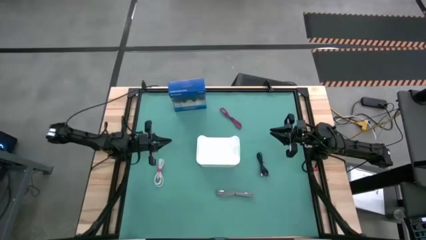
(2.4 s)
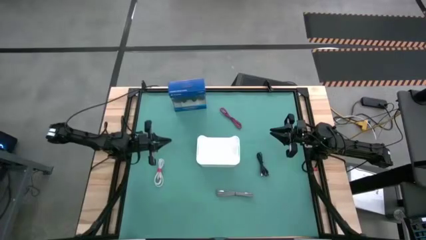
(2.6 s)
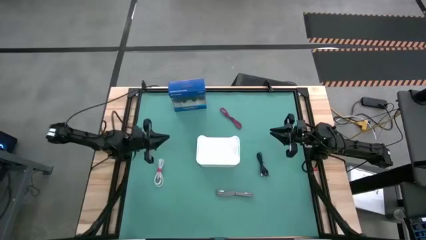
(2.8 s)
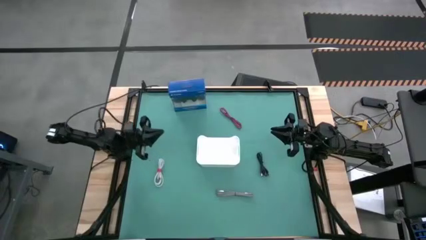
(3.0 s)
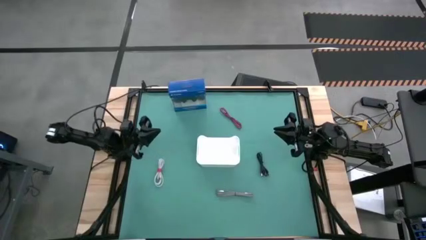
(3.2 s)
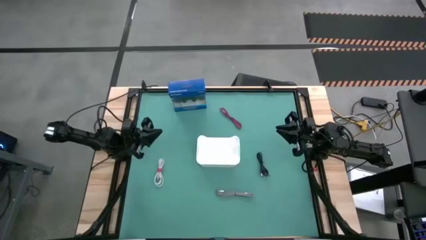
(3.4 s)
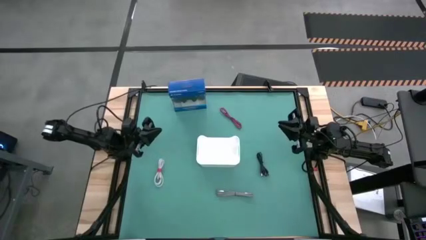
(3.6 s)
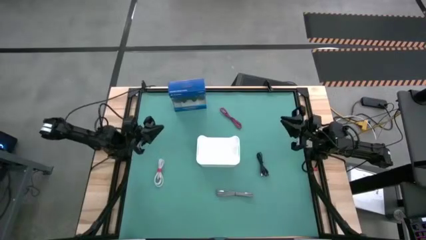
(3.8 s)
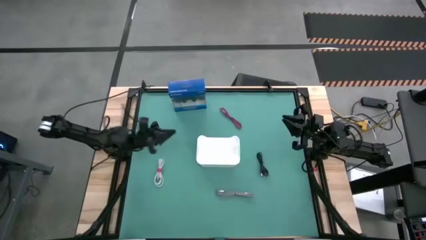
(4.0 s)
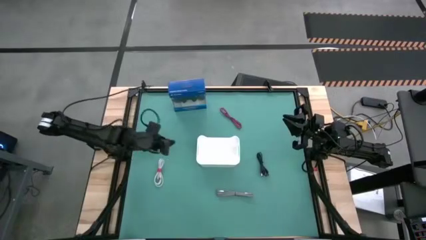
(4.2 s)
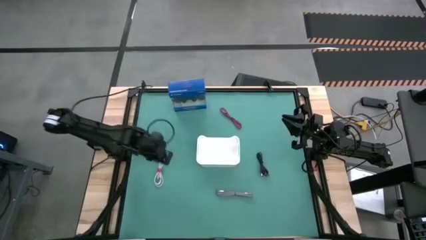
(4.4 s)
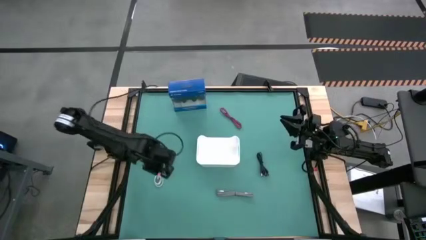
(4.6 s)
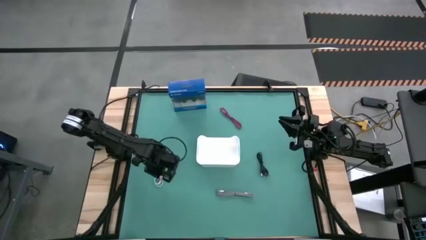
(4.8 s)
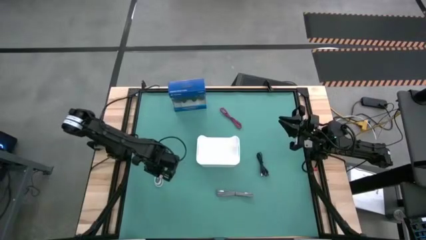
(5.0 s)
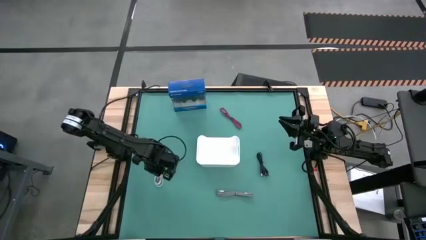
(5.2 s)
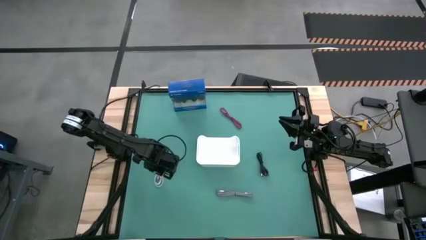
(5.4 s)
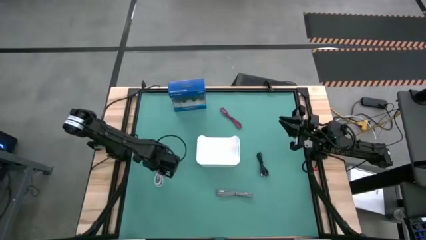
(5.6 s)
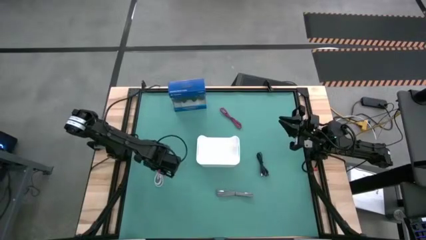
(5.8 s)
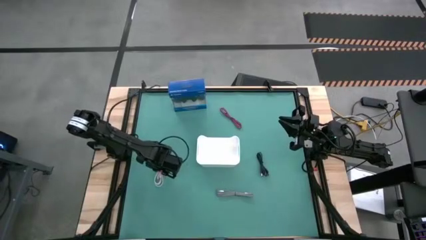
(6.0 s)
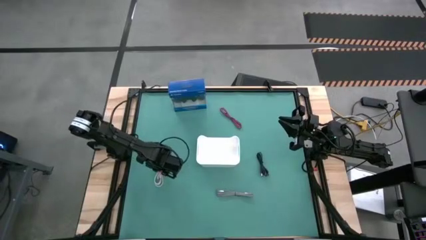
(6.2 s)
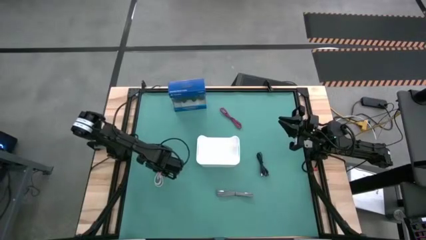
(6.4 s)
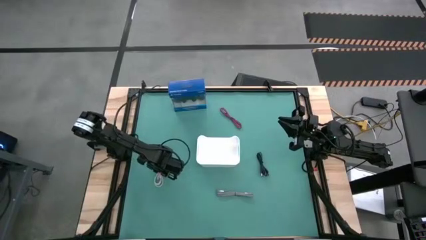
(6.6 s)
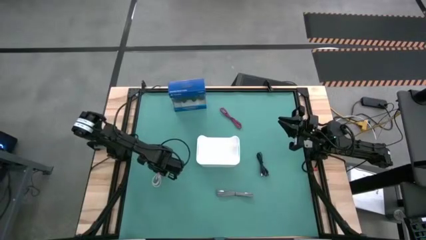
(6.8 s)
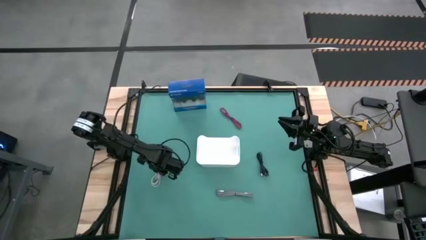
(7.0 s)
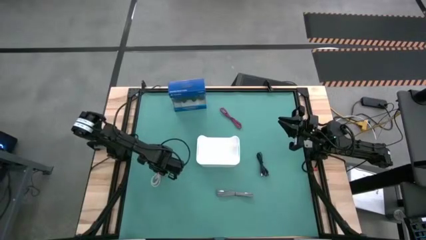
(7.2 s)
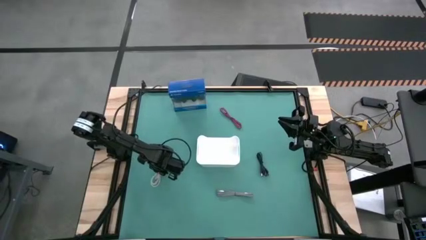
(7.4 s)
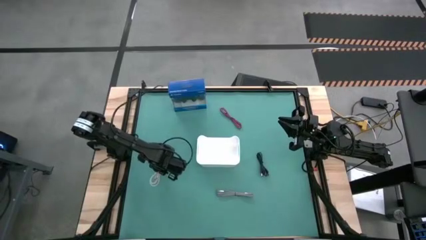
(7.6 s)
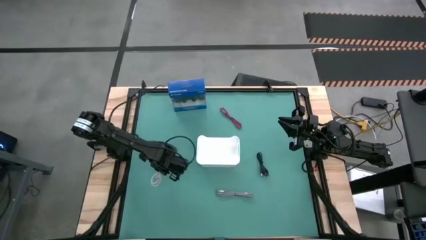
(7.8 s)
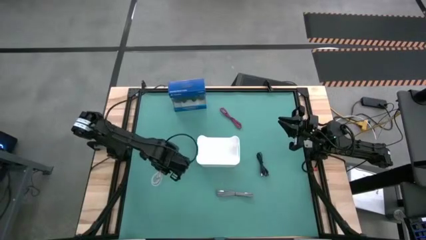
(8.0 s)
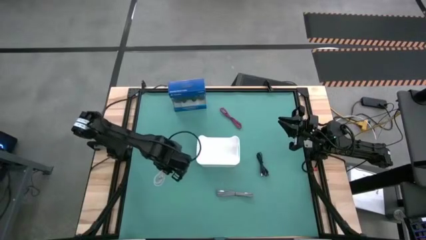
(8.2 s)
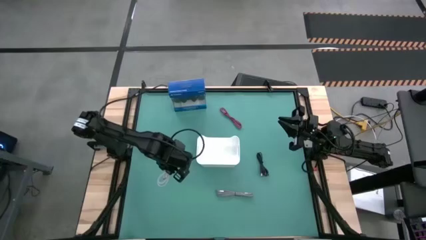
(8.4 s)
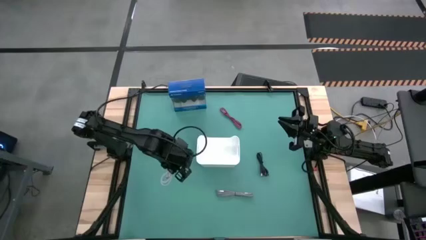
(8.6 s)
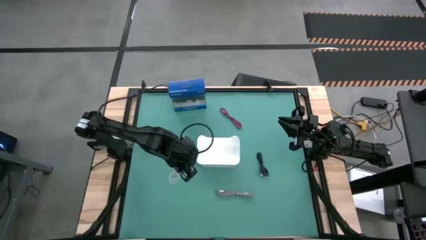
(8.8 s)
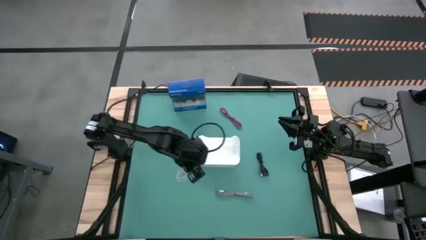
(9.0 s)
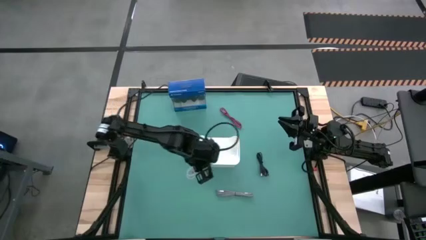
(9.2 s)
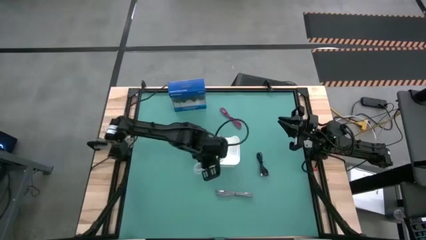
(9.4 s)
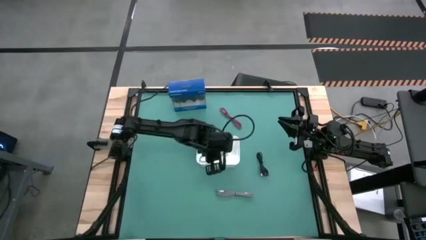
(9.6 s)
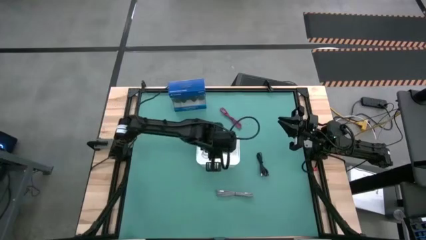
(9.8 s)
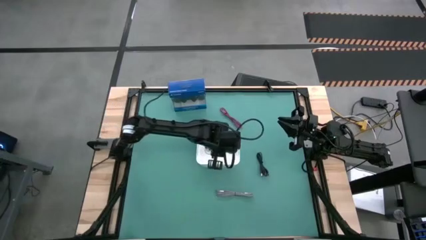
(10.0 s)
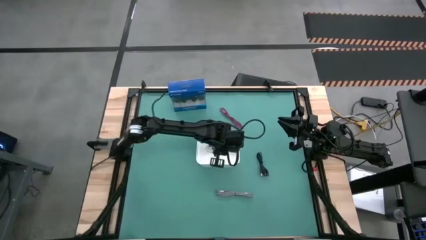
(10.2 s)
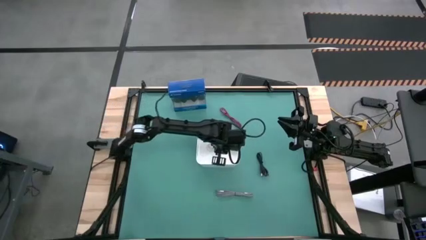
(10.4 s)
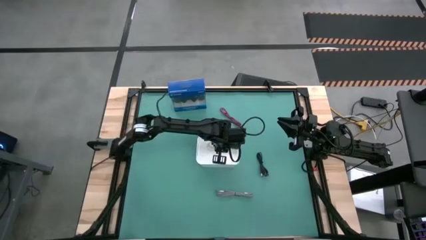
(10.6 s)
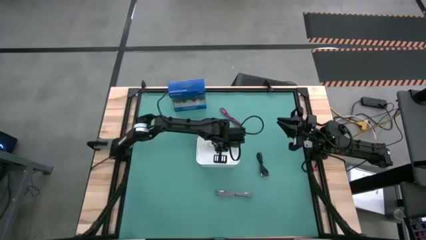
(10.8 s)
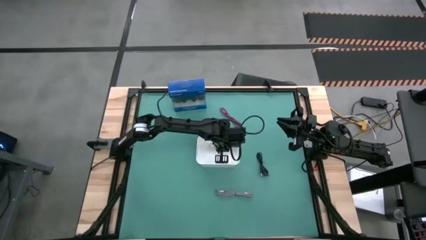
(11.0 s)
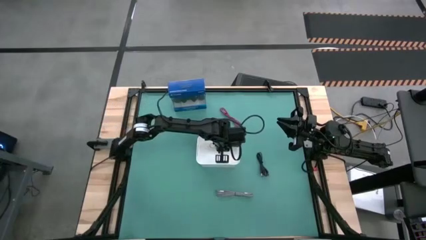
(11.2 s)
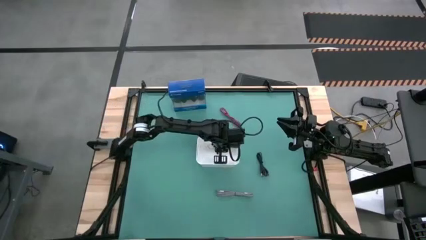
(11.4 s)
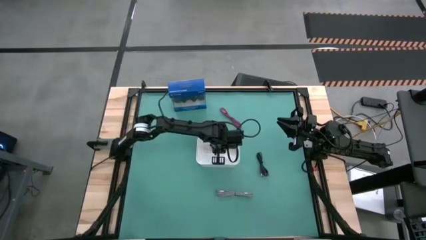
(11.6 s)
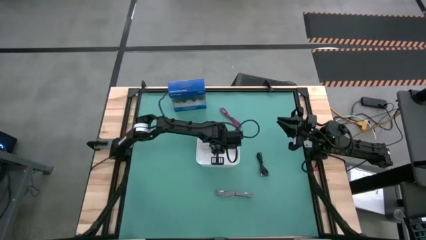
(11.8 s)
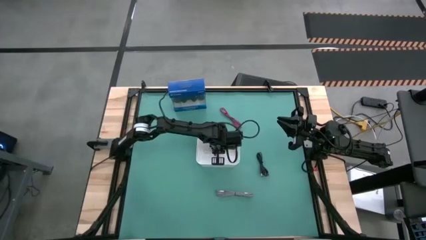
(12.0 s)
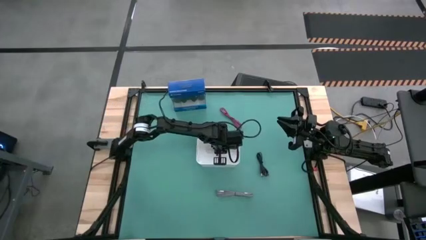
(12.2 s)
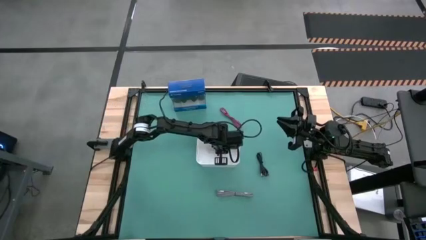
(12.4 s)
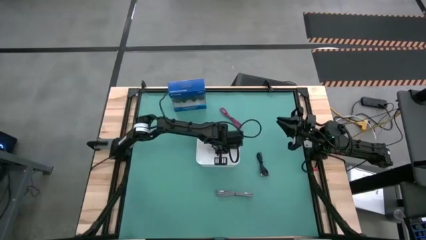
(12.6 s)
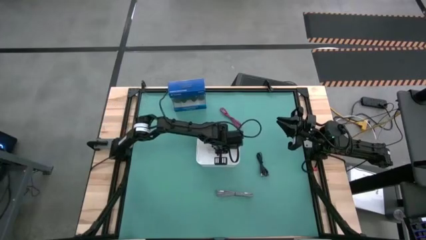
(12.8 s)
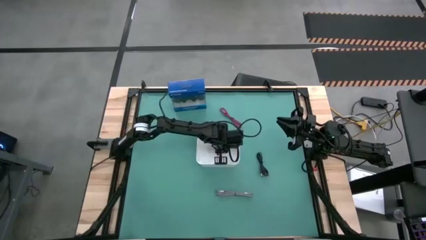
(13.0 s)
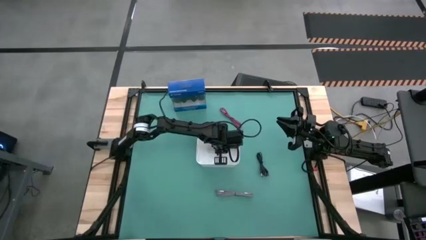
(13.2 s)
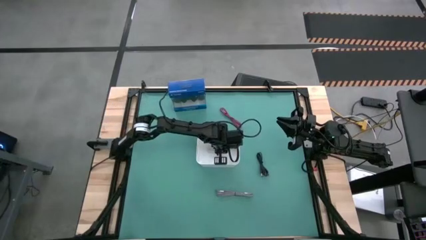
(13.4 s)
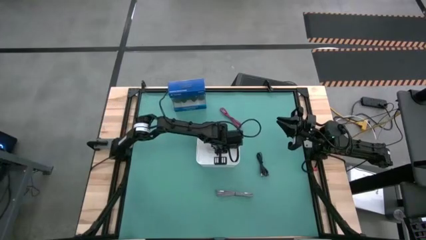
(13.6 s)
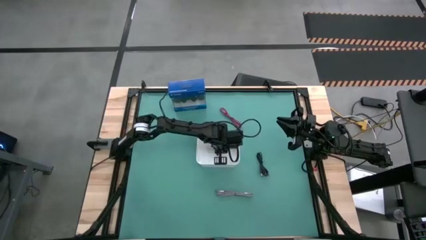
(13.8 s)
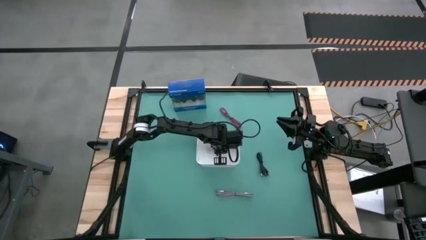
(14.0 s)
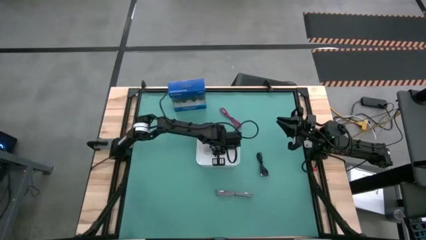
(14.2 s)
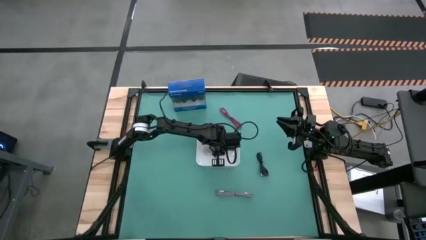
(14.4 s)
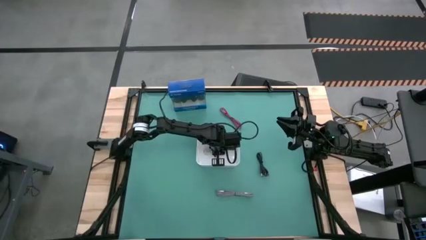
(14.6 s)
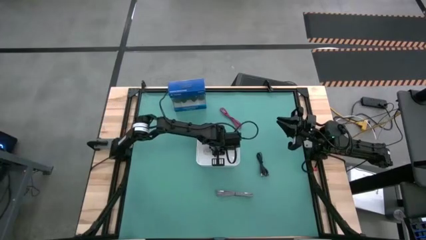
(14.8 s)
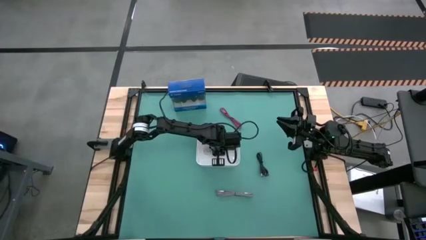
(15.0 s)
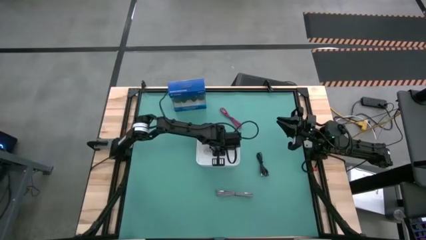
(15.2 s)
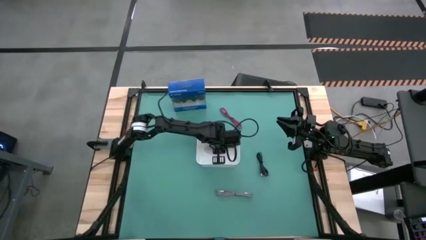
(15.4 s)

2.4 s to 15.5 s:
Task: Pick and place USB-C Cables
Put the white charger cable into the white bin
